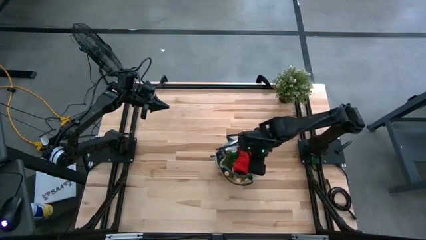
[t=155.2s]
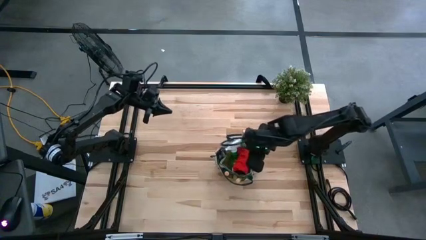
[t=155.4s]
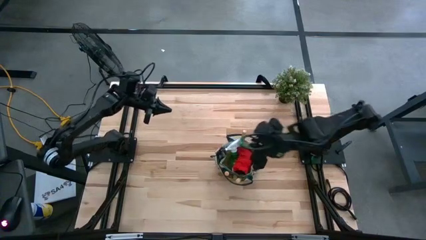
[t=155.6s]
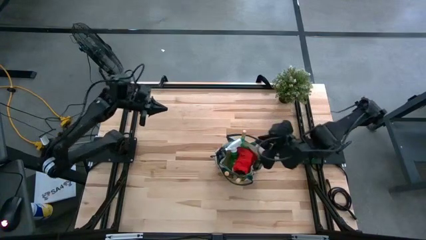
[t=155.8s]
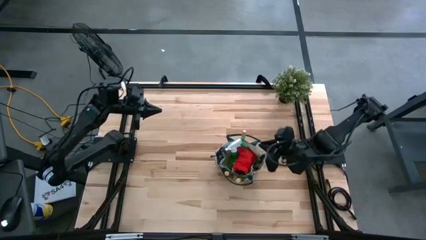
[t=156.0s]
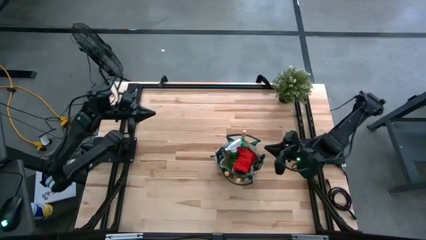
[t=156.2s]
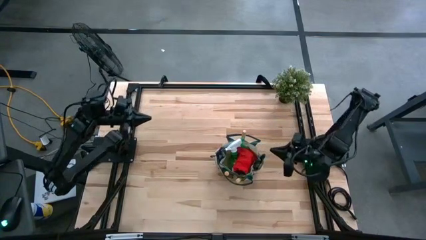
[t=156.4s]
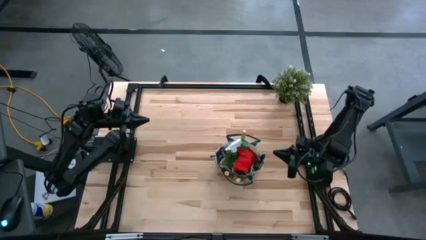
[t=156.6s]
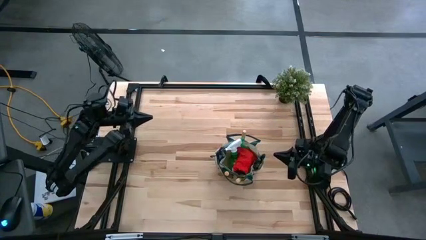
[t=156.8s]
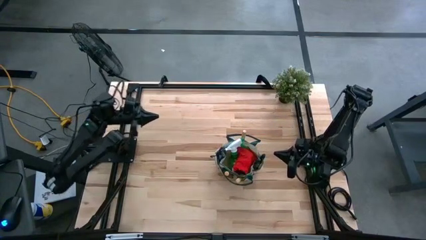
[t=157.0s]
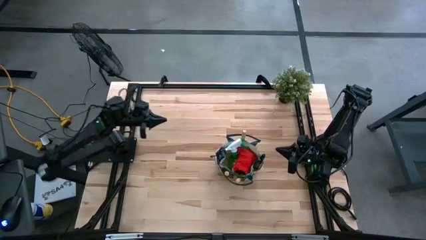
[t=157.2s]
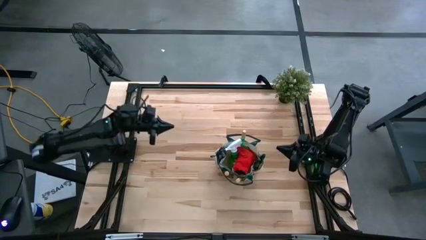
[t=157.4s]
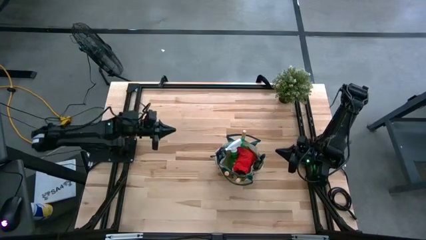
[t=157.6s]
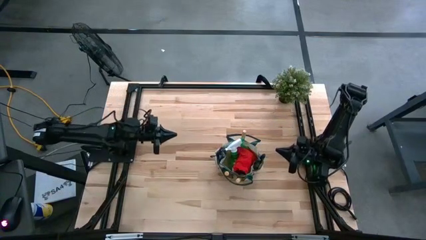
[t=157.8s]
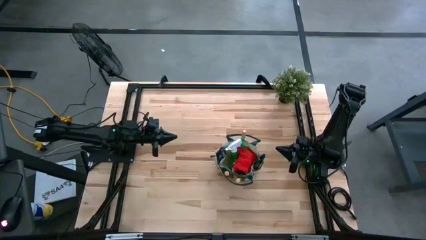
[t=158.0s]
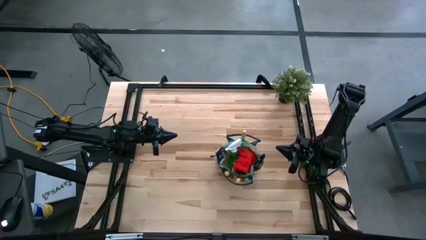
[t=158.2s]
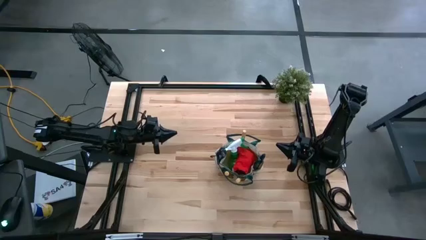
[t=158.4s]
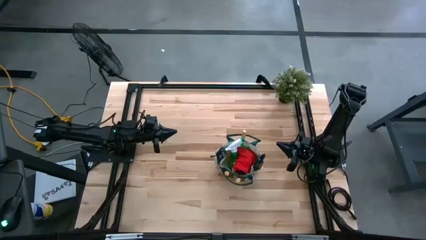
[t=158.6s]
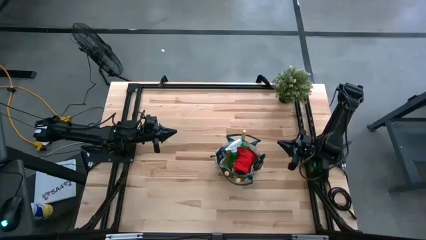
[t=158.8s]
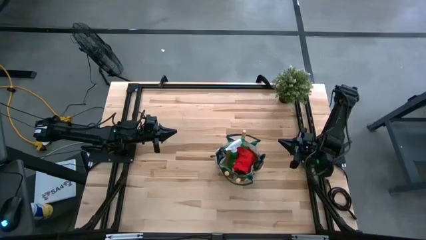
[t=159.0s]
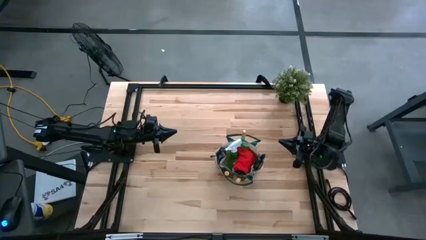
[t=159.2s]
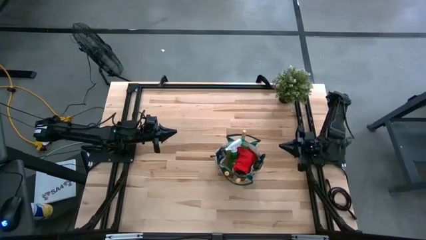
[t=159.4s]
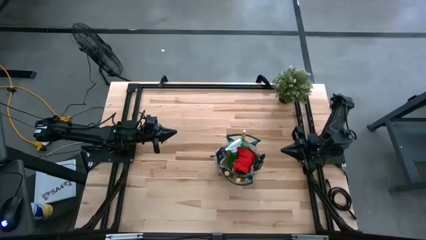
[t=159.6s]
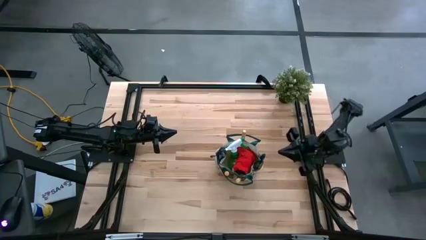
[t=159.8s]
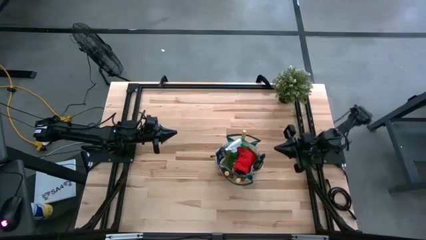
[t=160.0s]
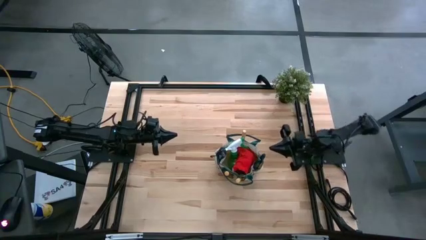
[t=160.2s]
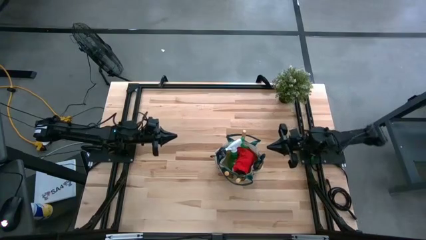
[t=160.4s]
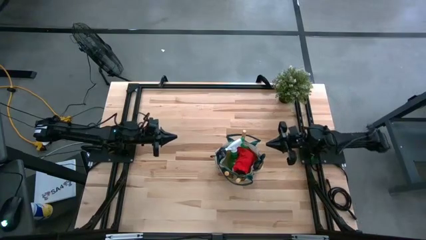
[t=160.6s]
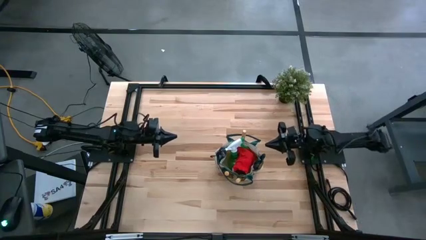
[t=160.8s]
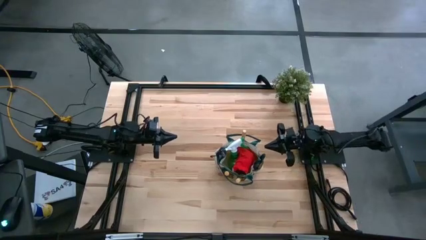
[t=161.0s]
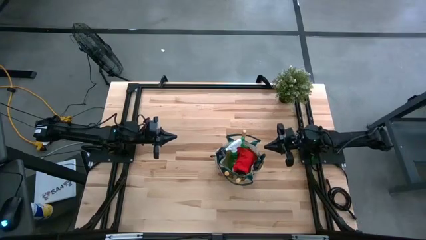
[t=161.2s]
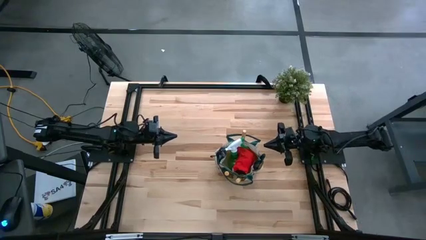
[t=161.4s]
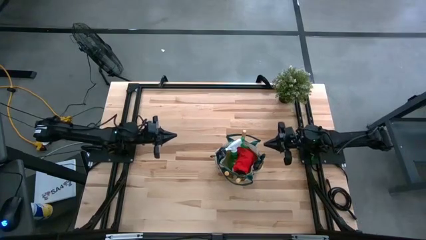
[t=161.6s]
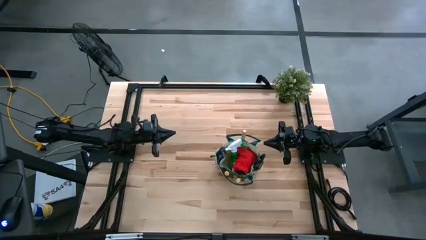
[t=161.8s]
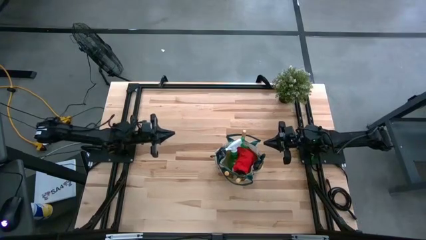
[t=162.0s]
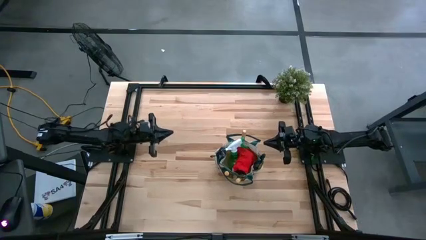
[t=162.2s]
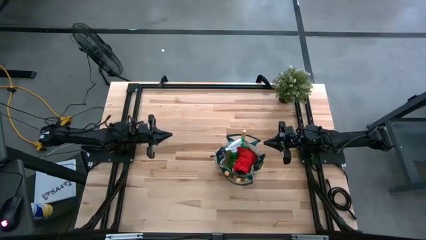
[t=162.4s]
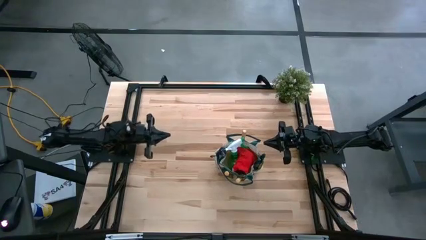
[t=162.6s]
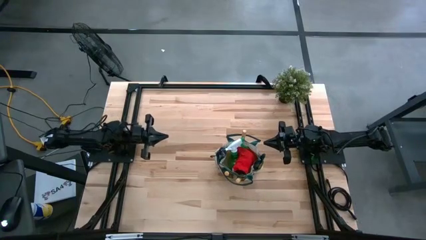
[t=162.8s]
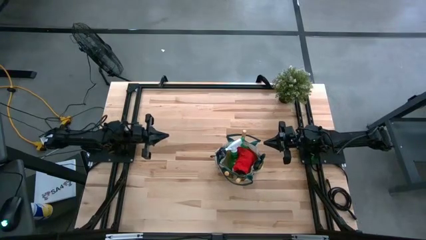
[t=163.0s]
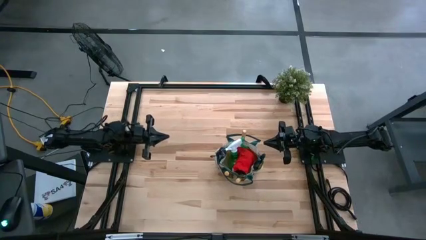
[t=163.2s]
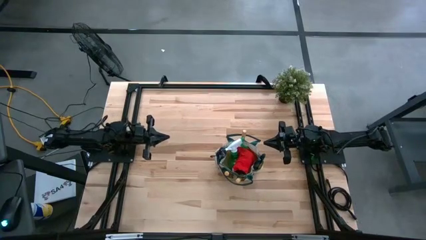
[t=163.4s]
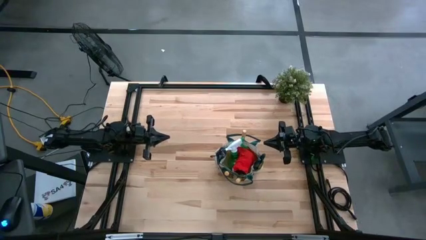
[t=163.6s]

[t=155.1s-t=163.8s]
Task: Pick & Place Garden tools in Gardening bag
Return to Home Position
